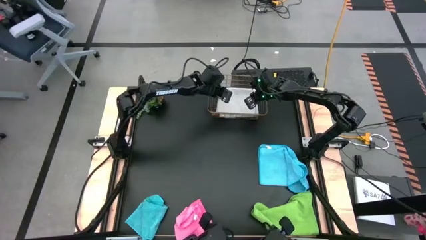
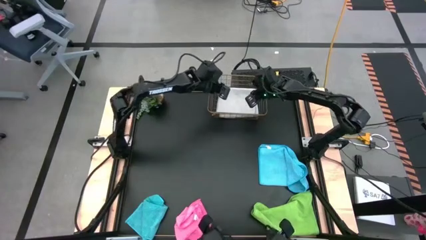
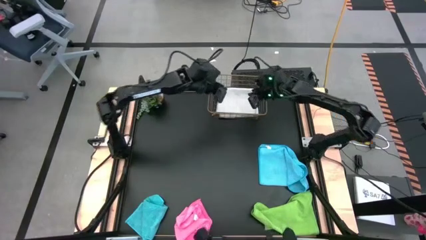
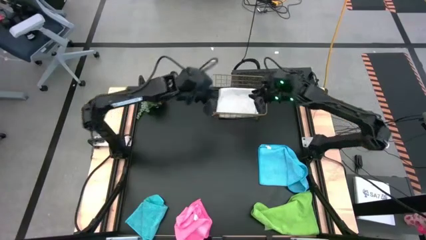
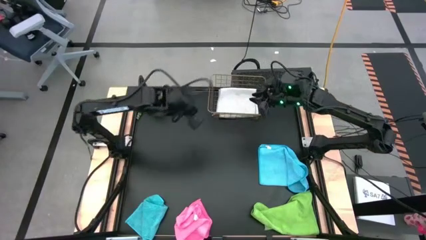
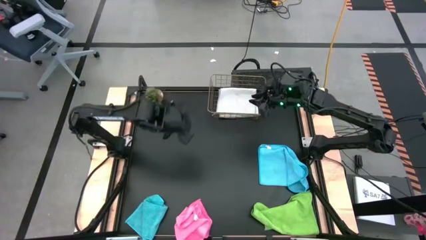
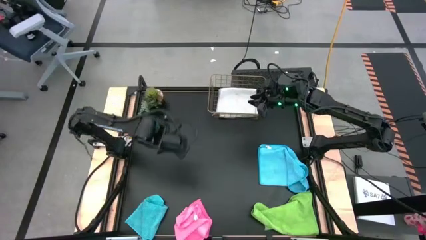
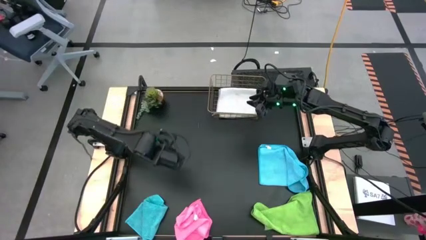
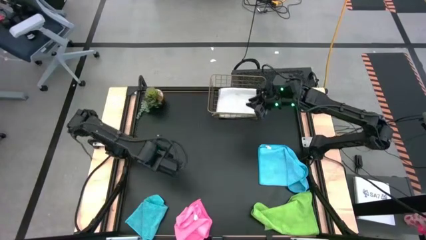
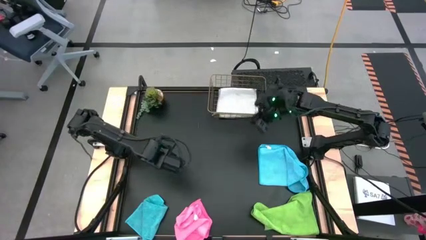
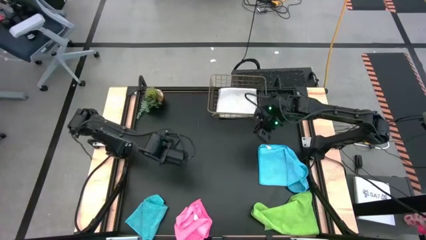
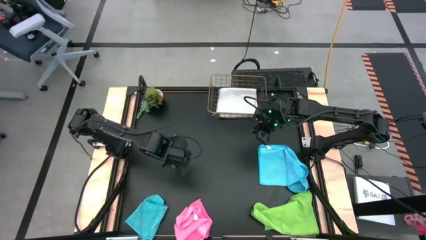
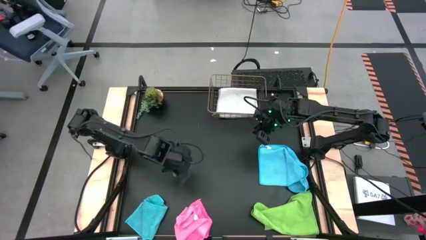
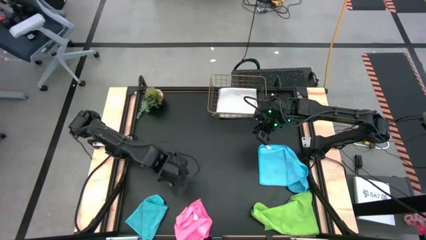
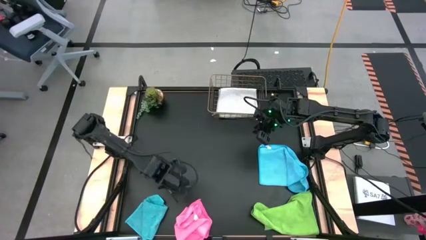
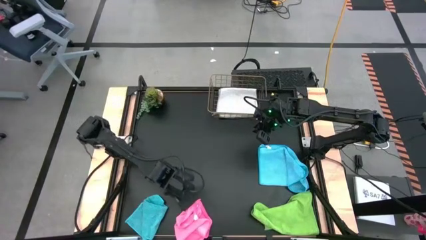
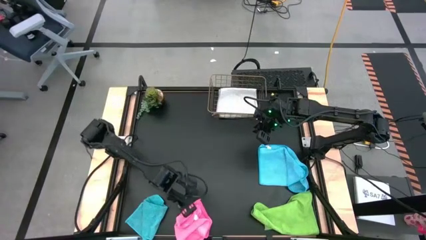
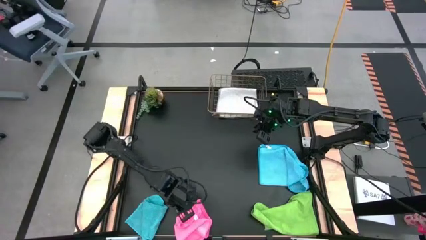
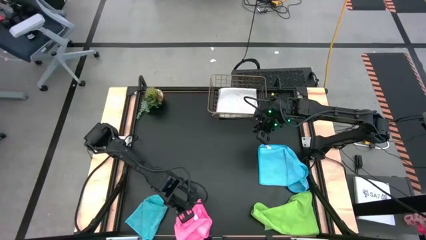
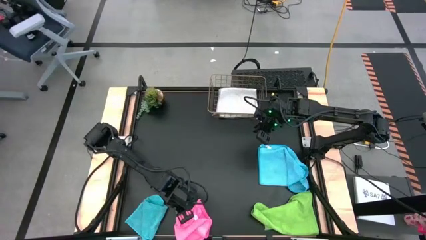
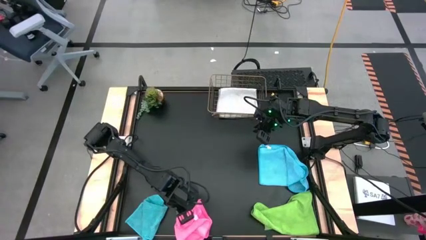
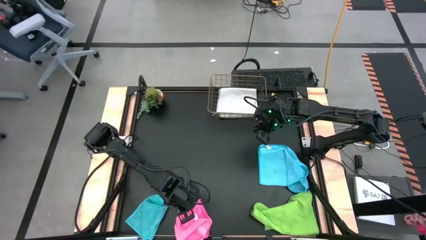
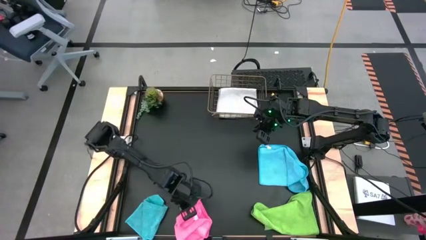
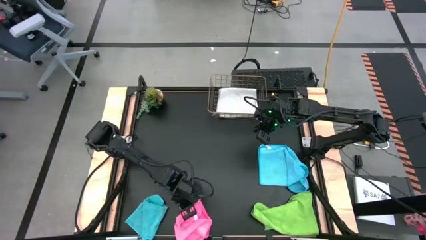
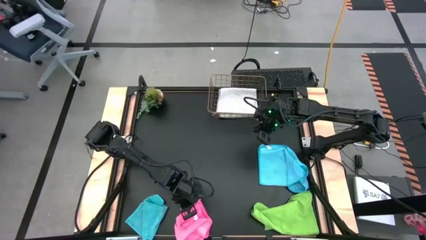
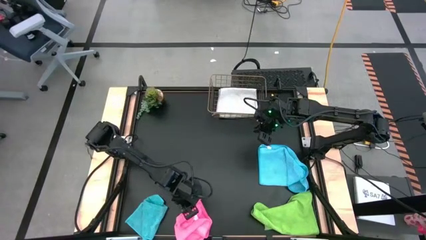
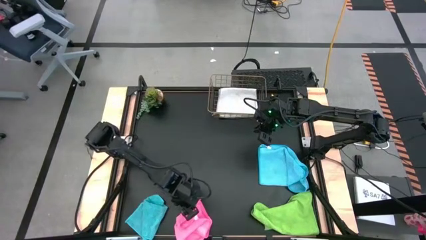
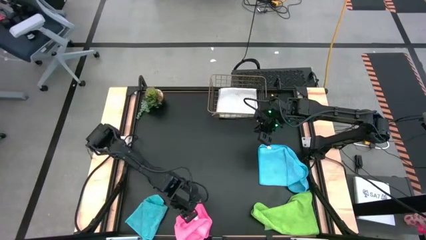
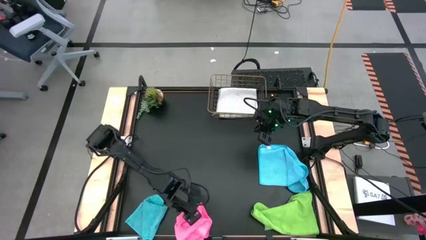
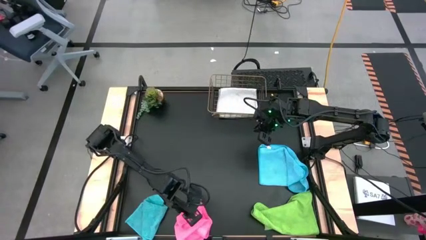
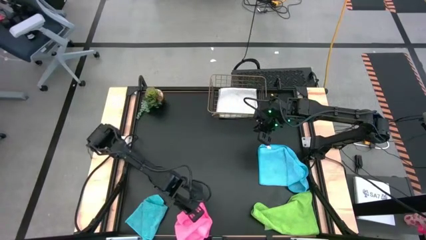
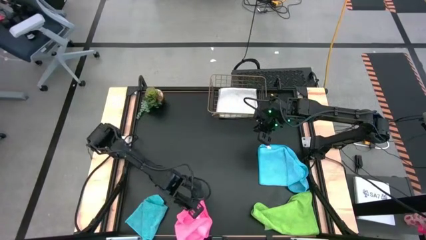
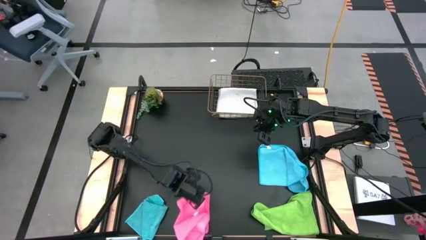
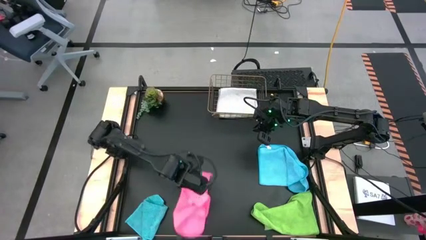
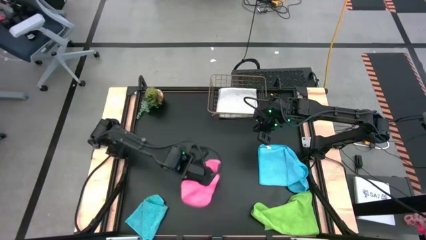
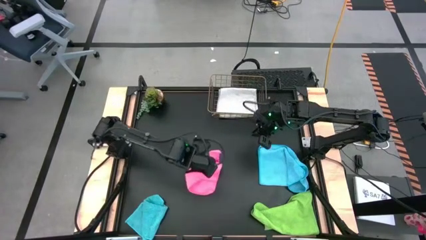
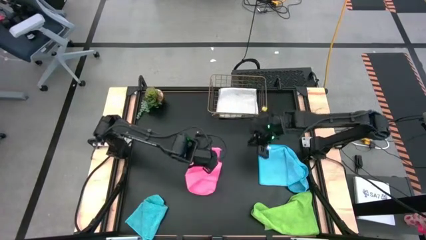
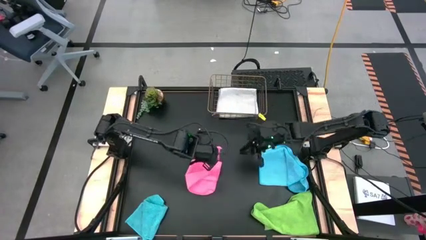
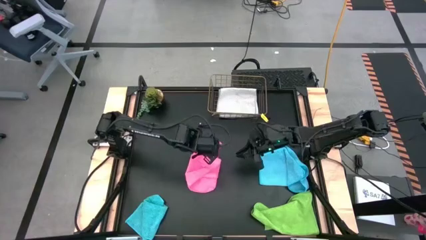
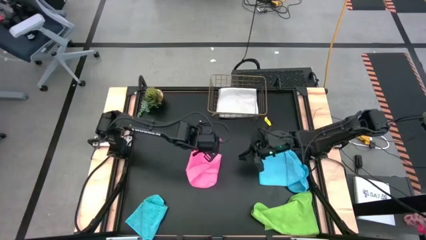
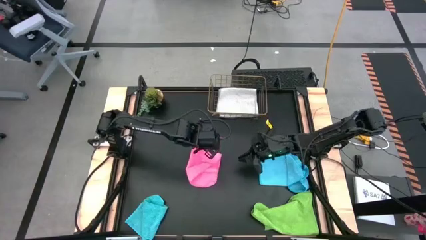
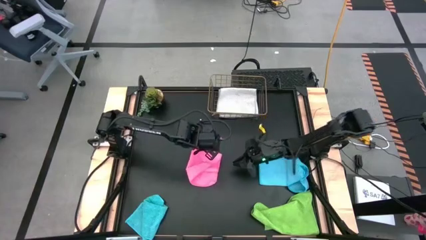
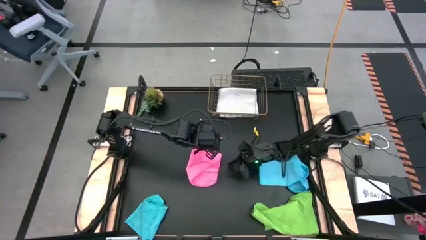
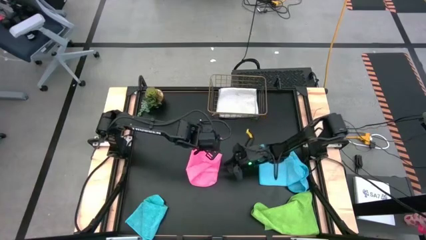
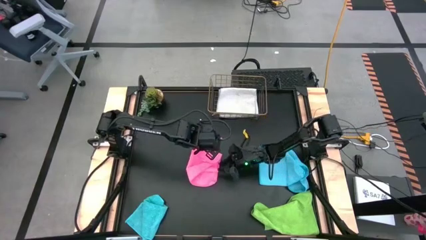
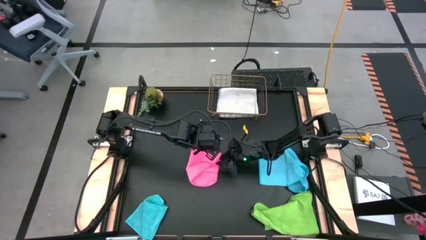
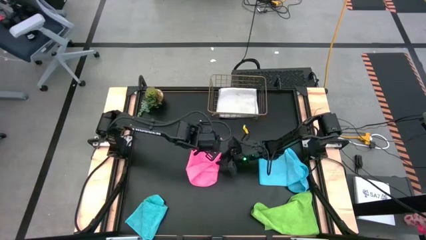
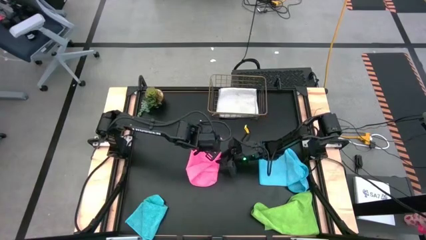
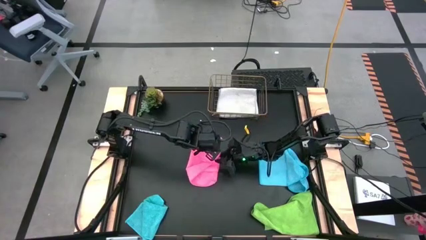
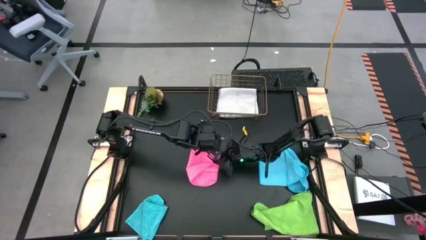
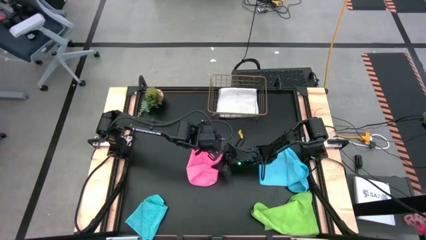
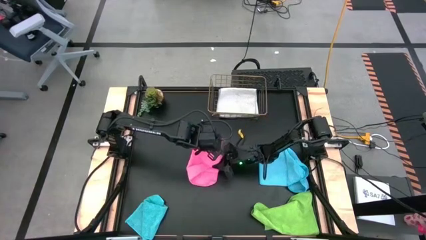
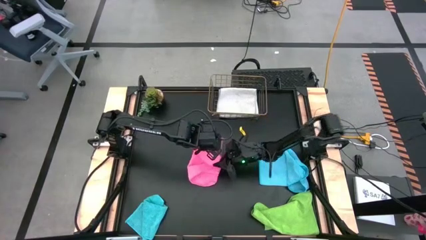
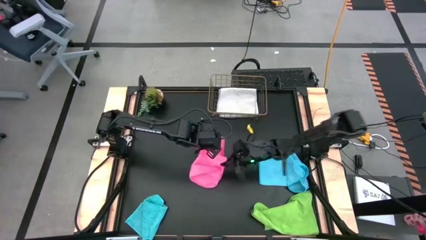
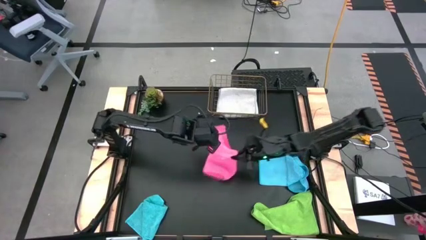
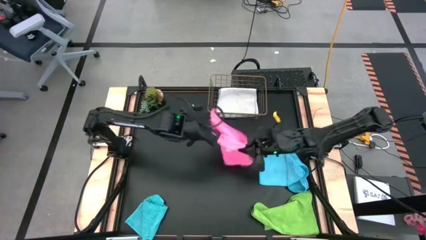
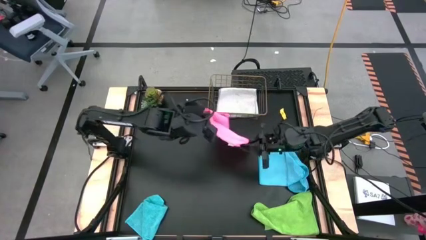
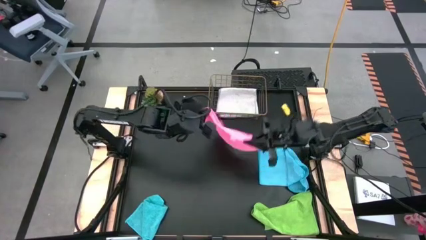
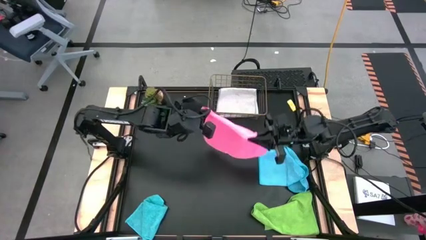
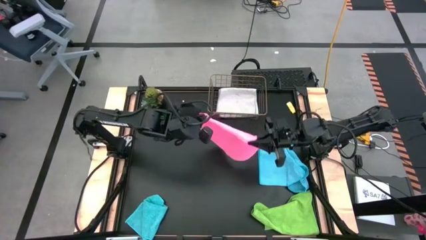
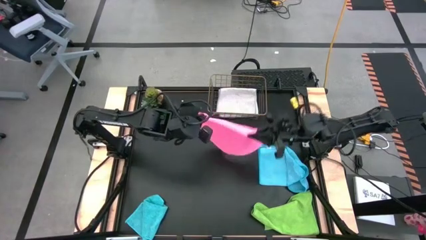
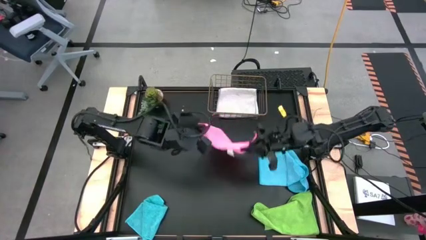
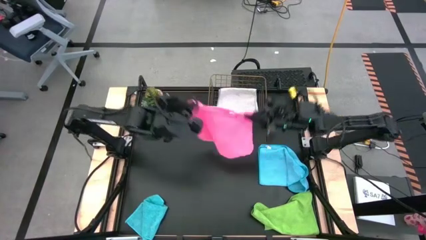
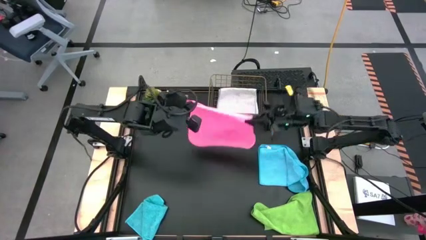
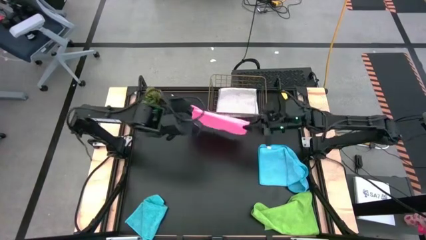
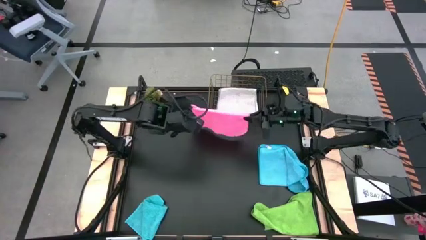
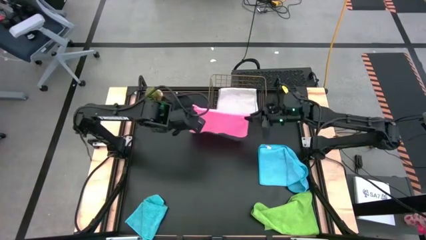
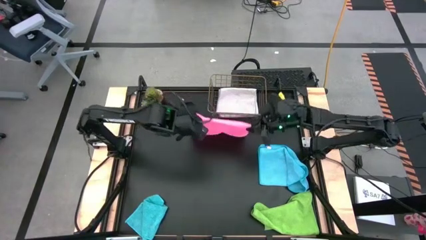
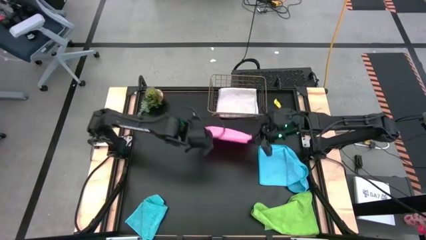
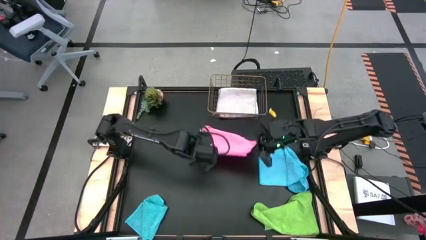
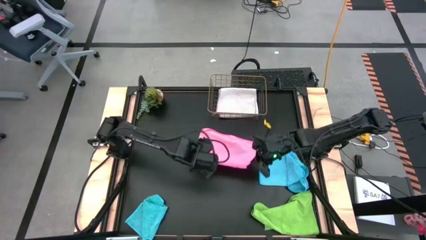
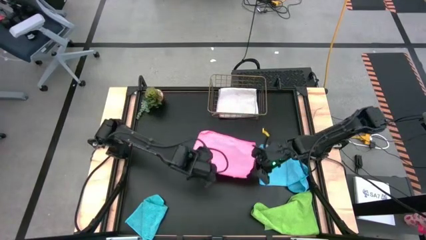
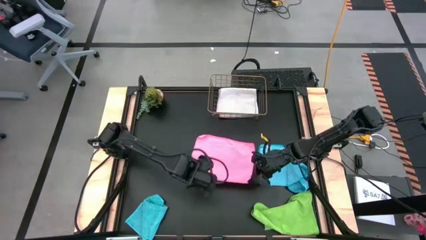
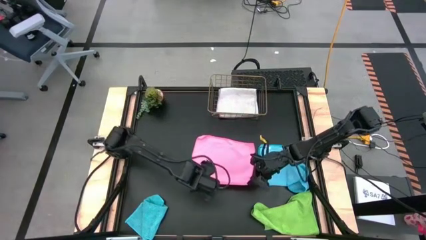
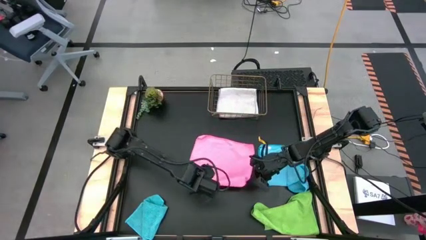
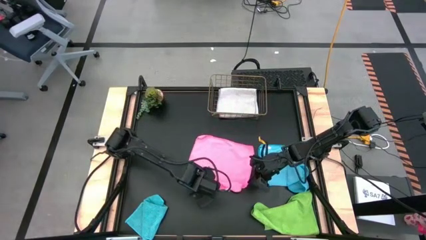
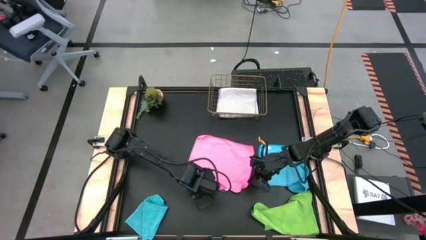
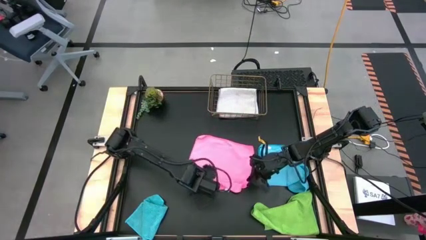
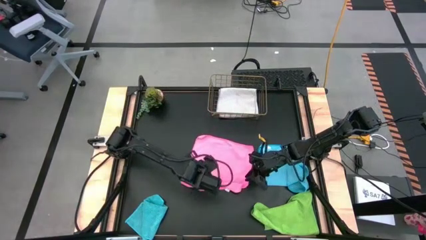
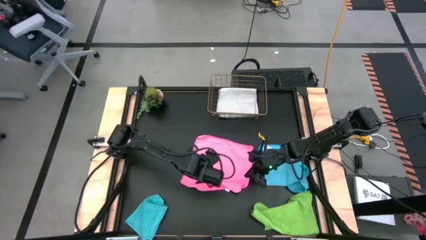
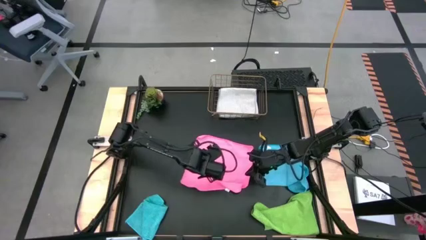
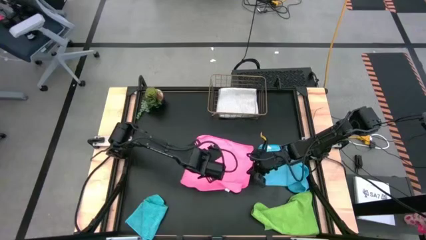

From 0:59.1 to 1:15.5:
Task: Fold microfiber towels
Fold the pink towel
